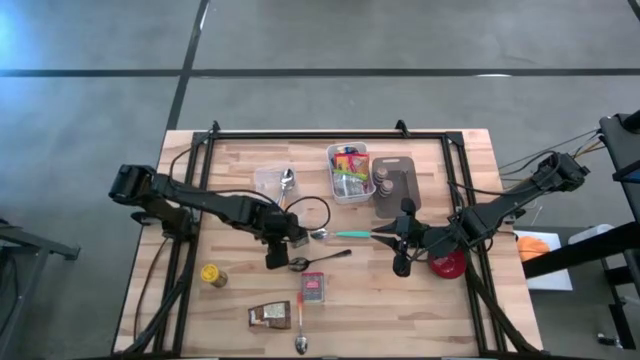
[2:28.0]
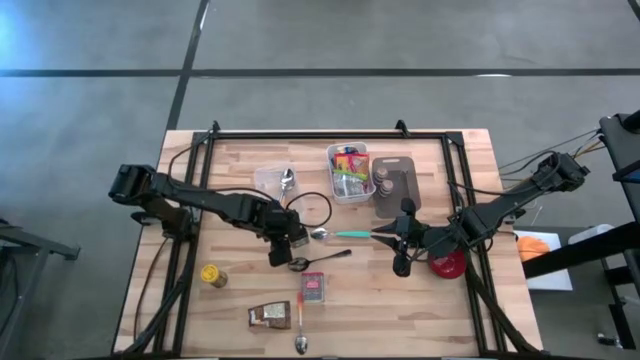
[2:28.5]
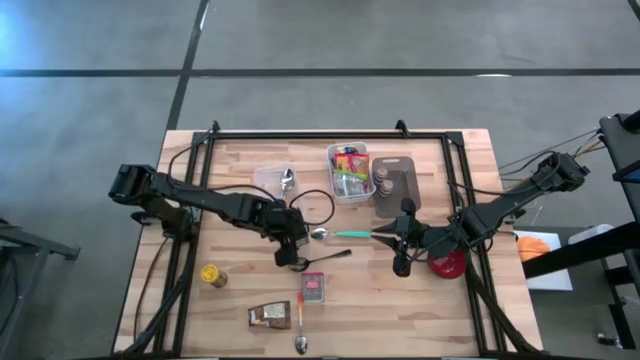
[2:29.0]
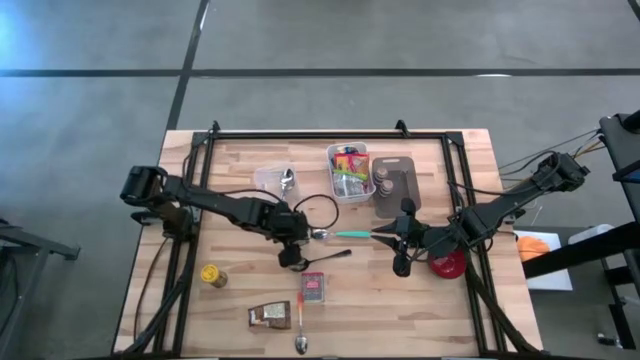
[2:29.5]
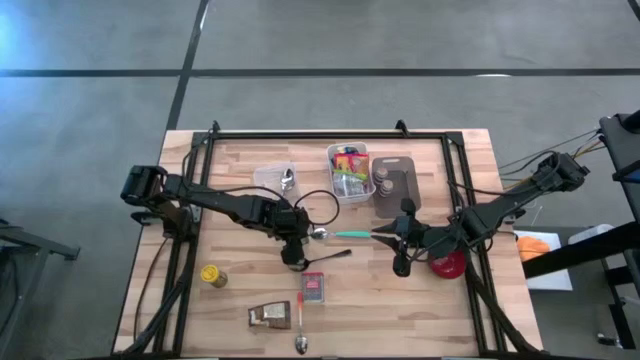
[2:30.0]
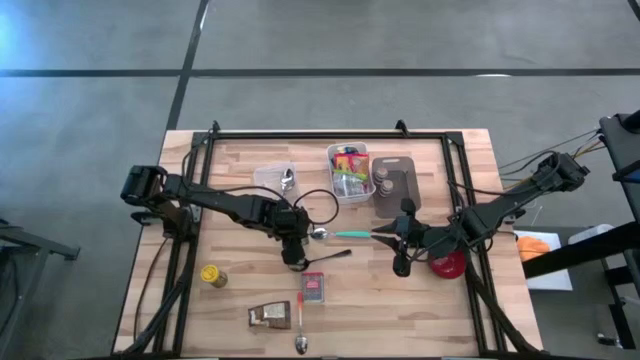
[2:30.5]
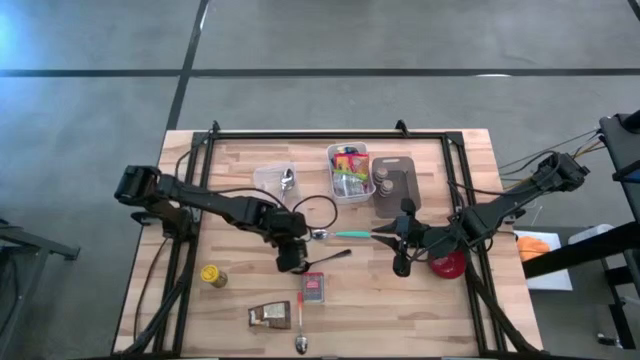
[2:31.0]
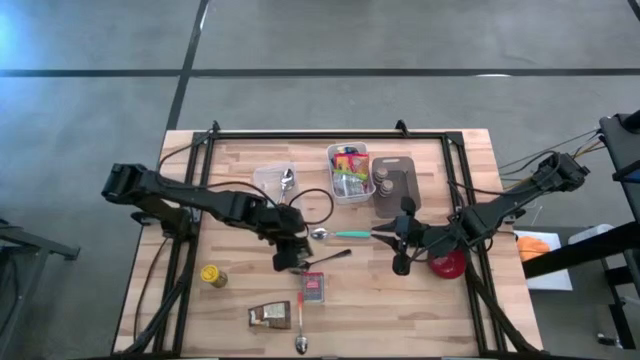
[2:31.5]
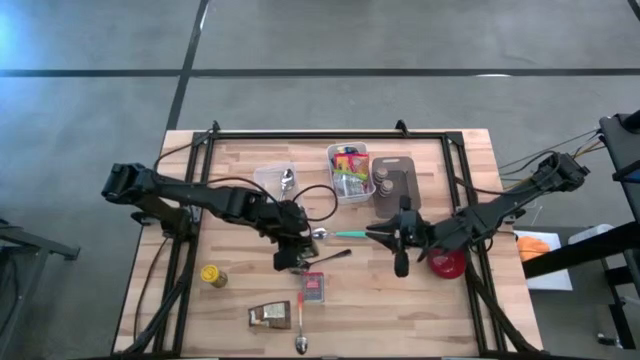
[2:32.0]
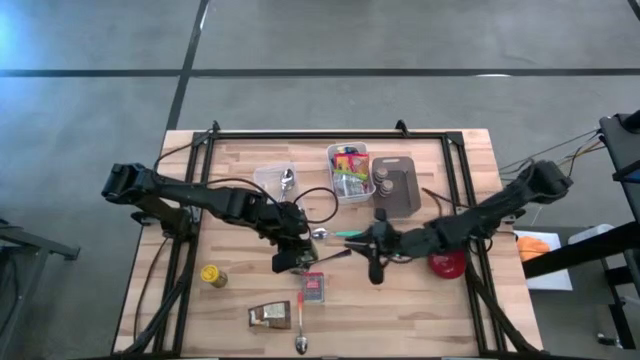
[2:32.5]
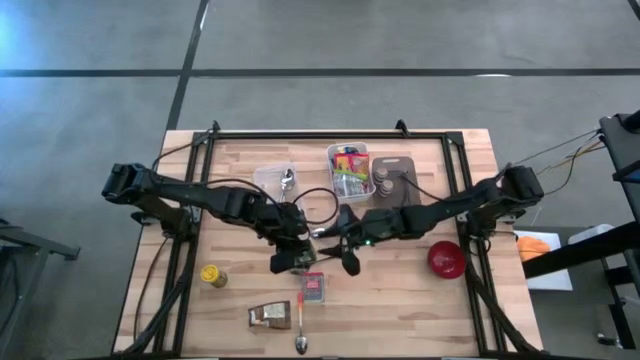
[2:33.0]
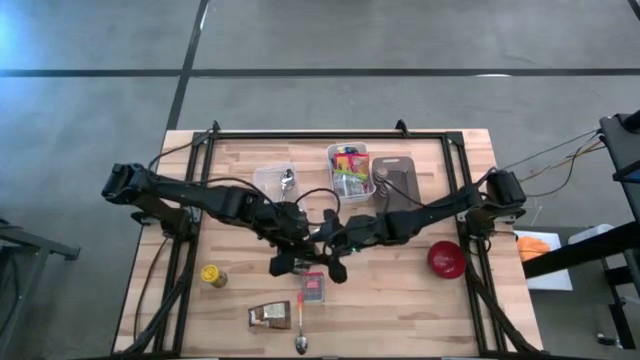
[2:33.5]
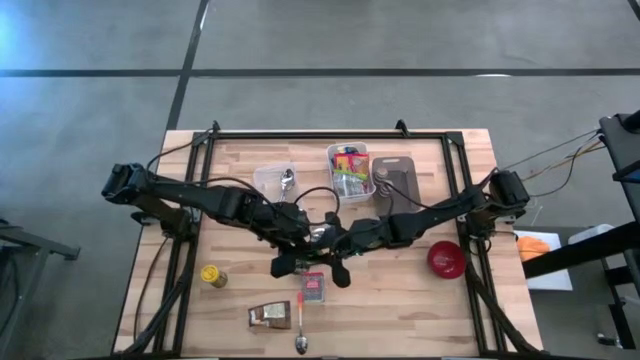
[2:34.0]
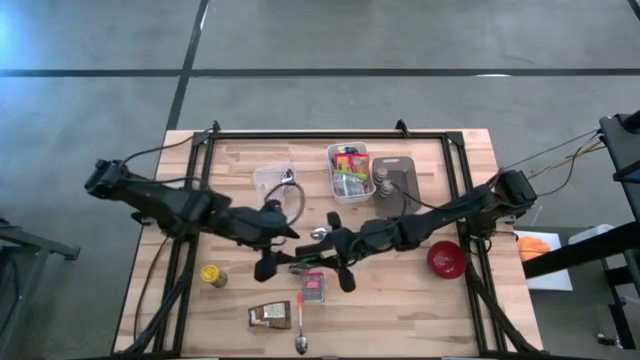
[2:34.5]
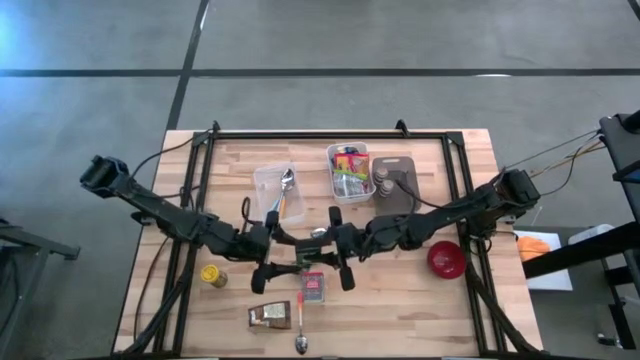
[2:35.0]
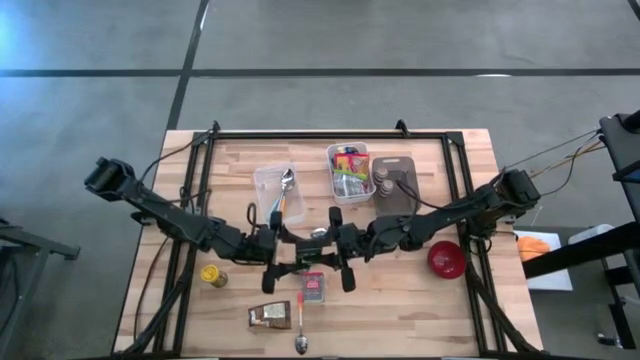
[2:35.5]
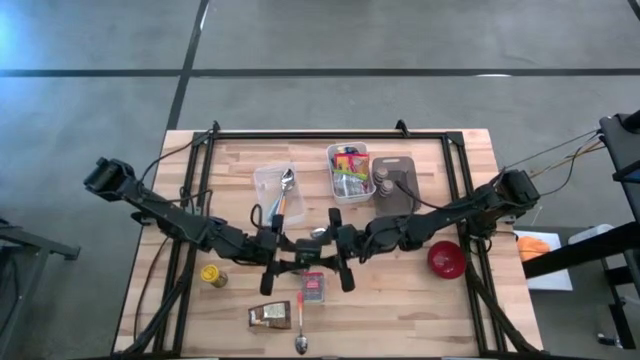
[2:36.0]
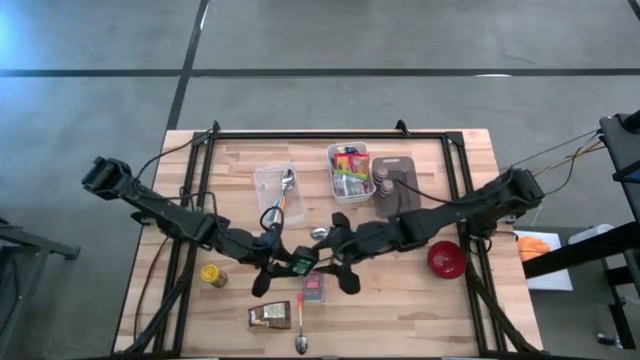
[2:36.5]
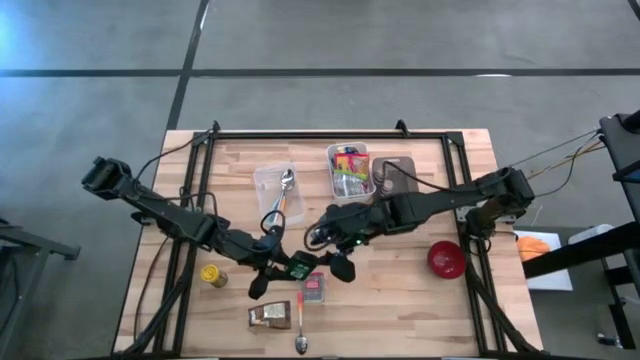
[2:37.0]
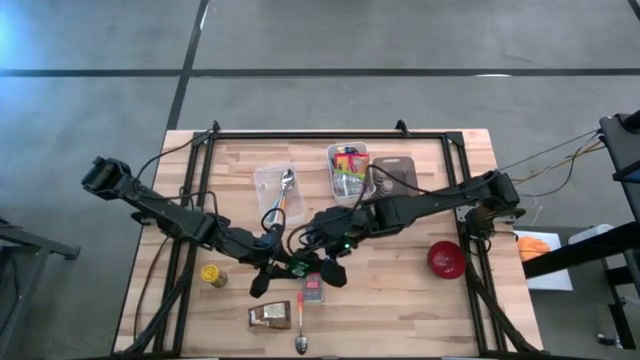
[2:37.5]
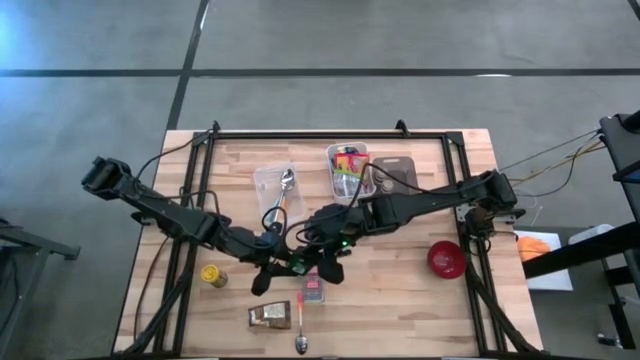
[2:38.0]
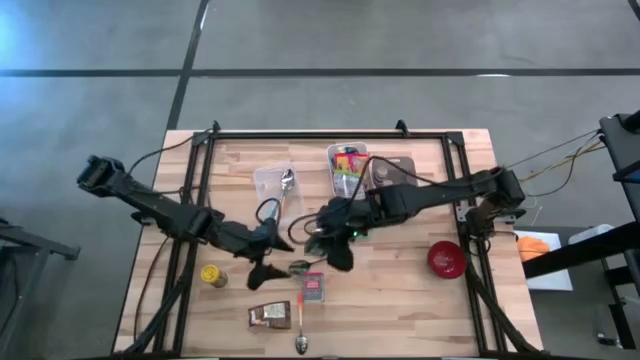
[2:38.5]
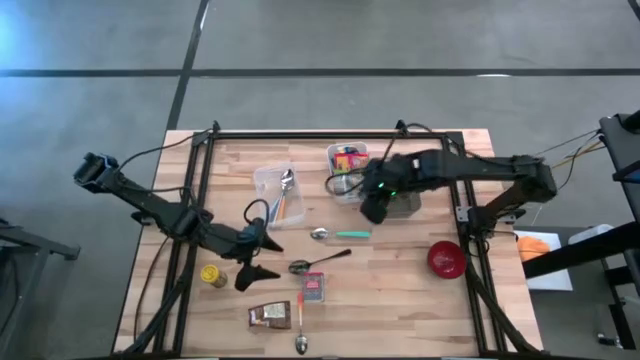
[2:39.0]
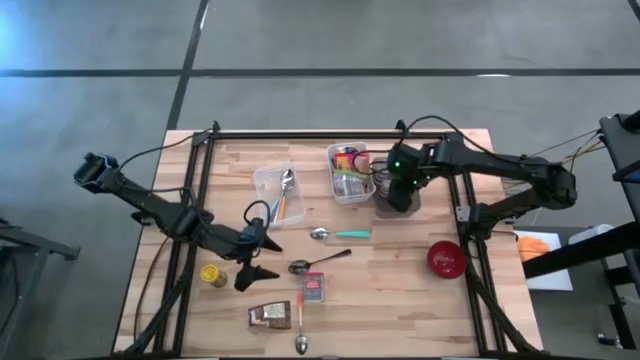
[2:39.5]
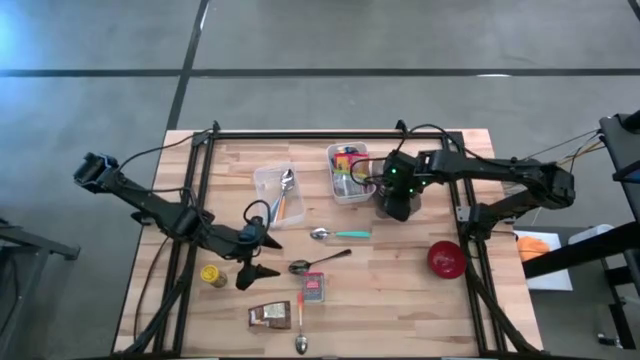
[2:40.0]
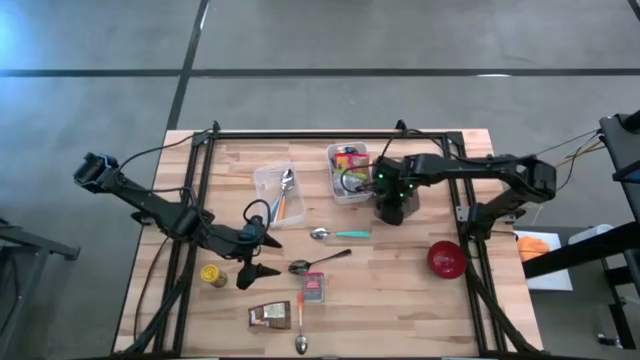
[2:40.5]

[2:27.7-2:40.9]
Put the green seasoning can into the black bin

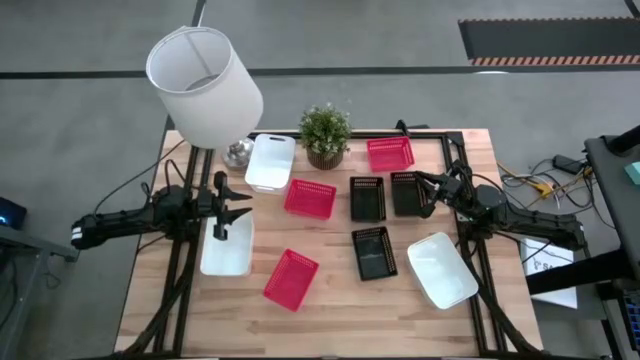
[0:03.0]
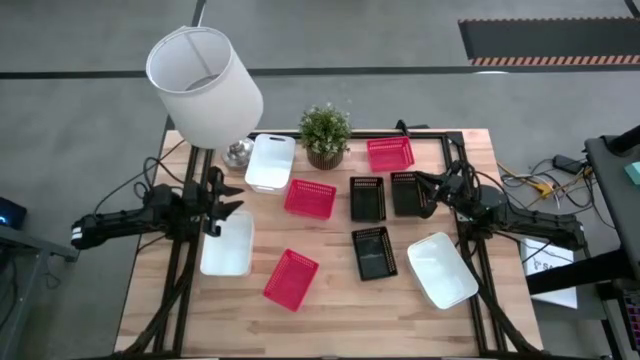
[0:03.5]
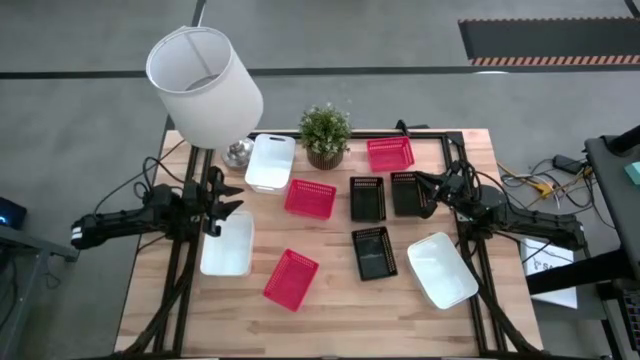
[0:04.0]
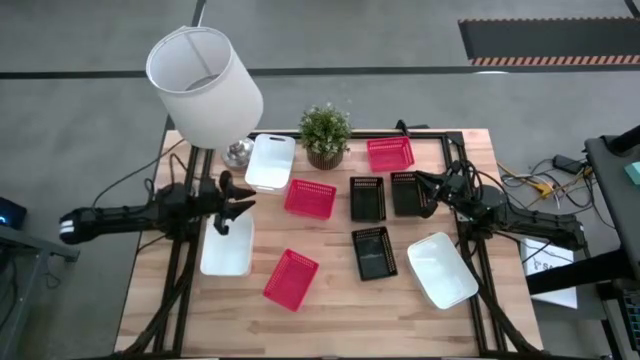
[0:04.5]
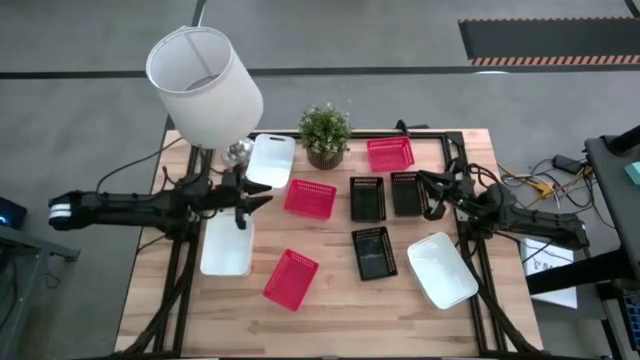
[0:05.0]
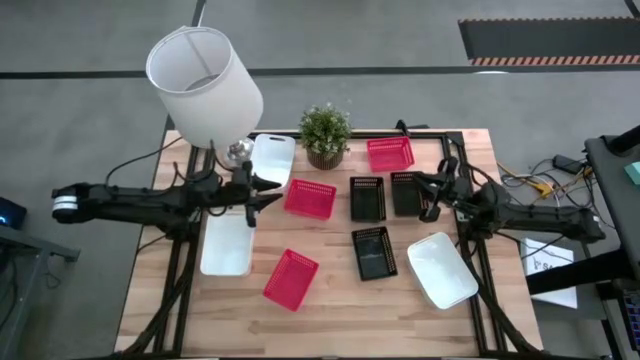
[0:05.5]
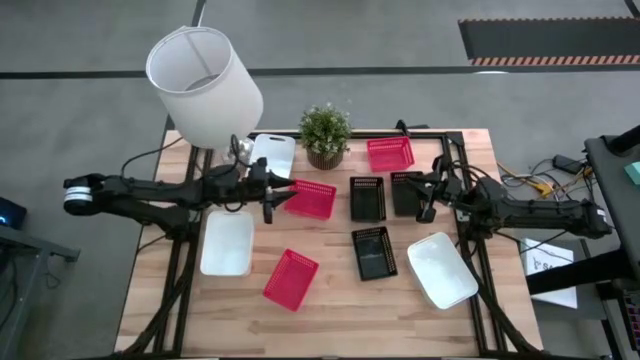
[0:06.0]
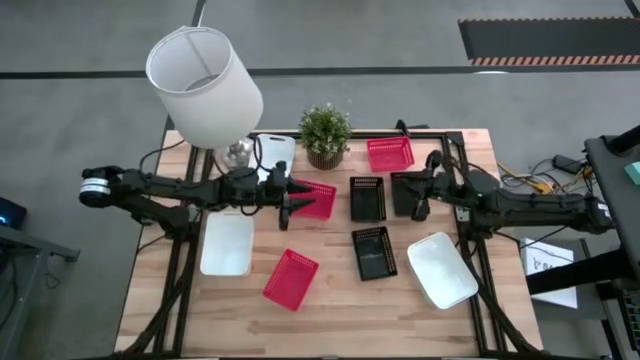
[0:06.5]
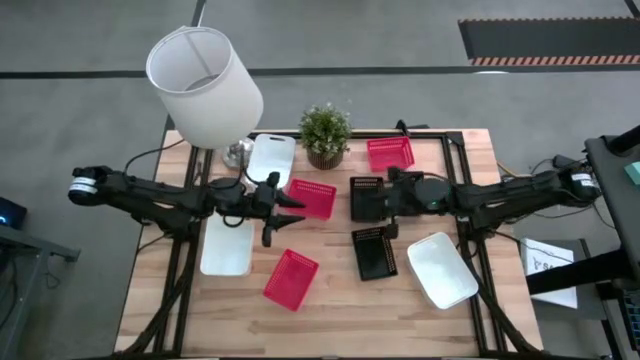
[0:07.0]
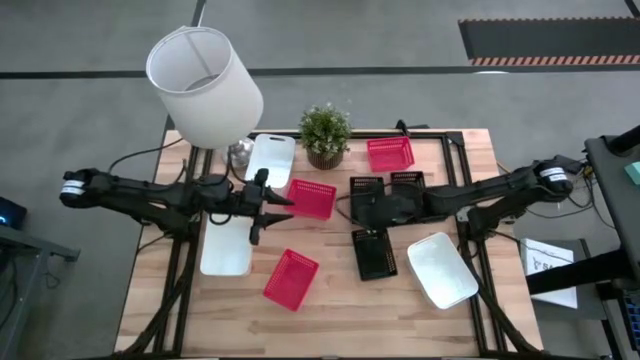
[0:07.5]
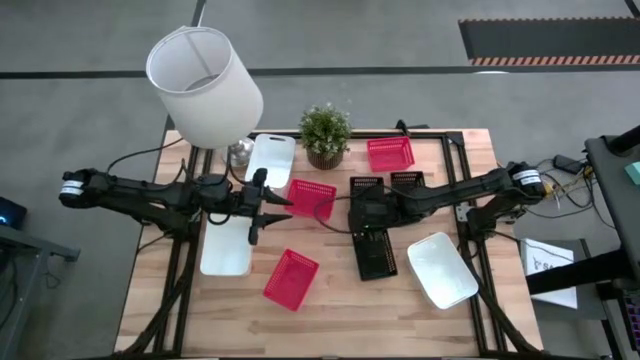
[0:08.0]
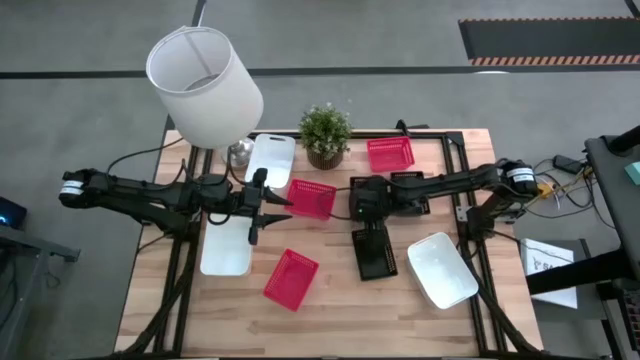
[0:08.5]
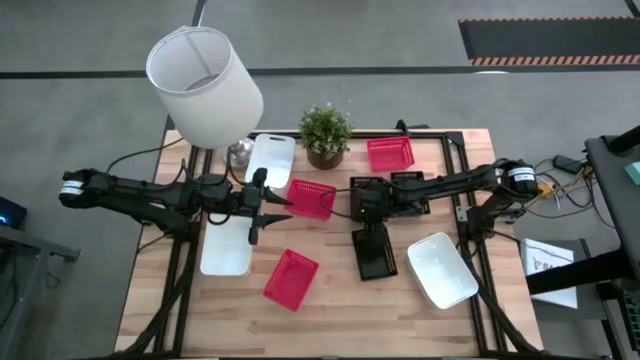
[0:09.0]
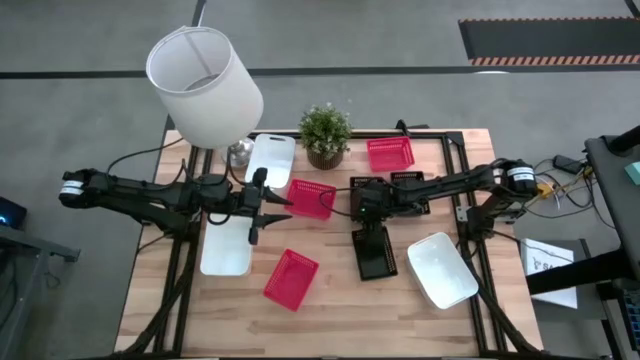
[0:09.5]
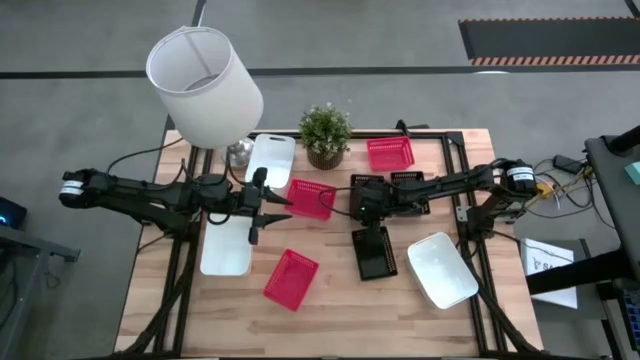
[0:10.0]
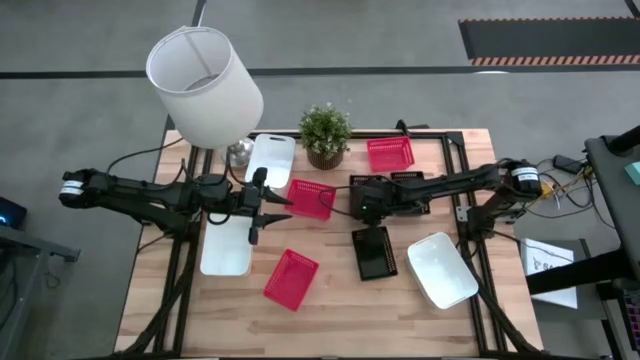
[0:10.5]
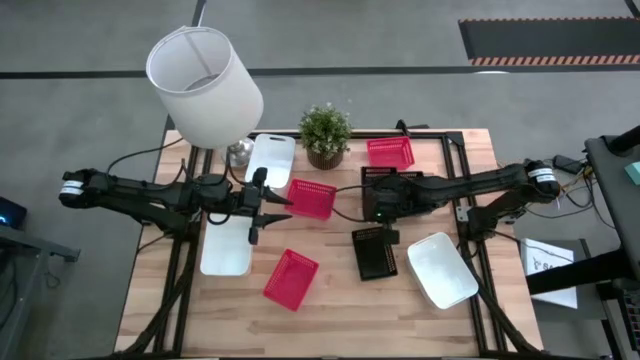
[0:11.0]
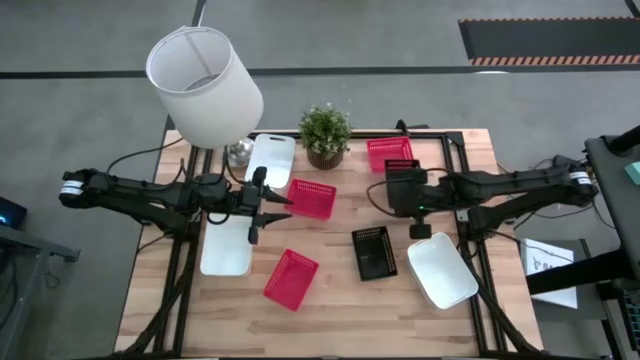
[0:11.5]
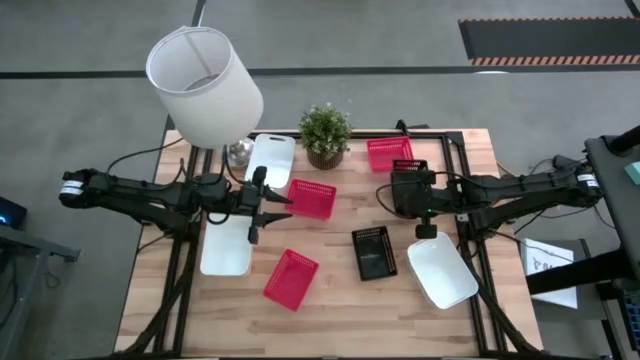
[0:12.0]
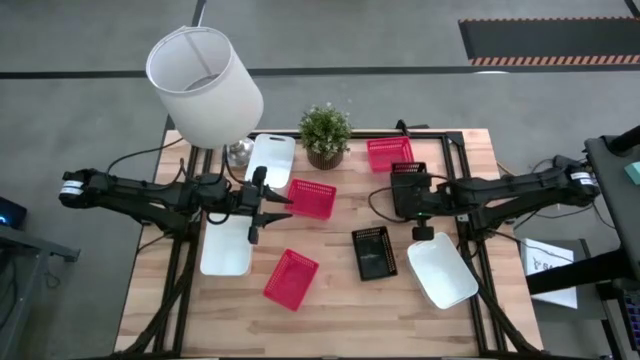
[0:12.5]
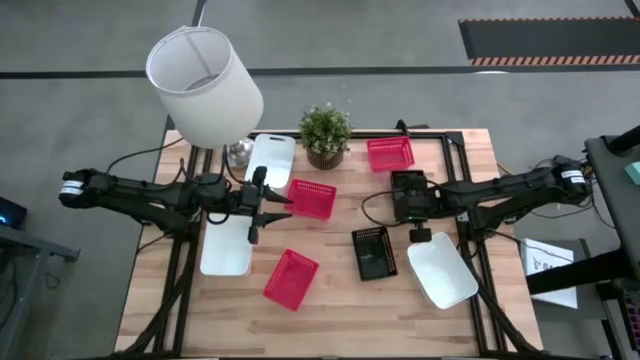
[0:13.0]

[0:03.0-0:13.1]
Stack the left black bin on the right black bin
